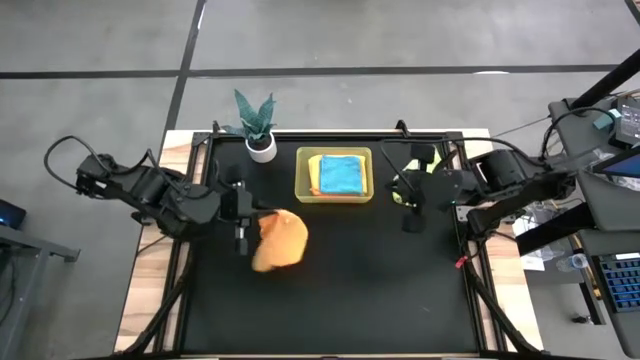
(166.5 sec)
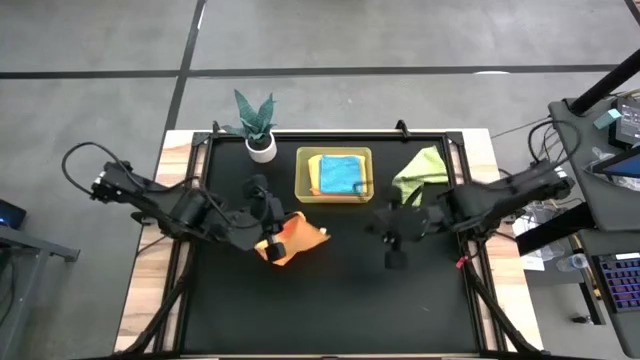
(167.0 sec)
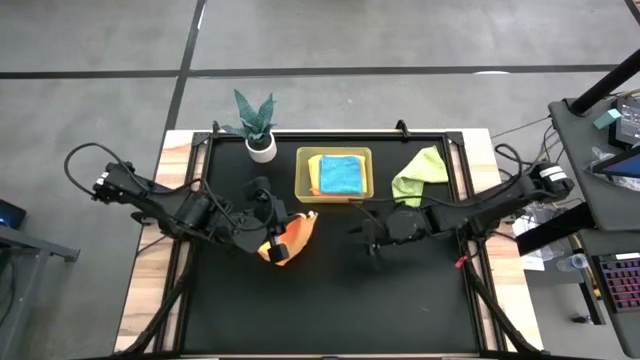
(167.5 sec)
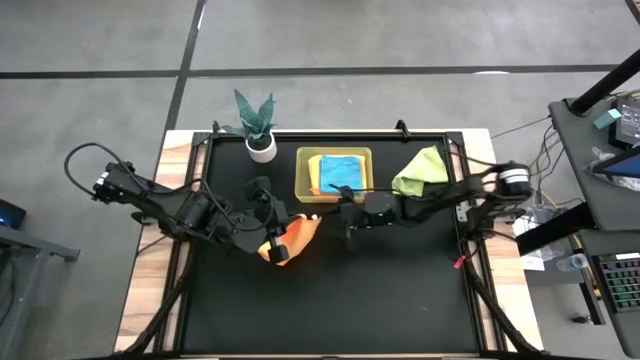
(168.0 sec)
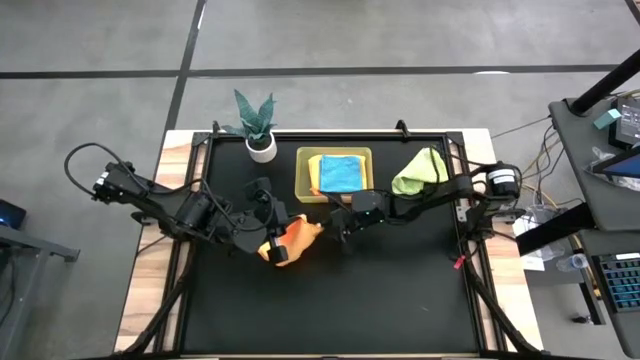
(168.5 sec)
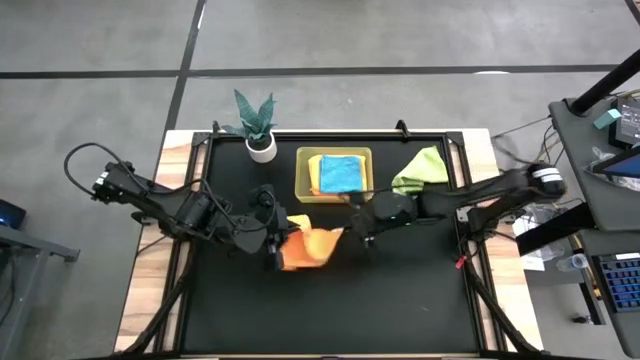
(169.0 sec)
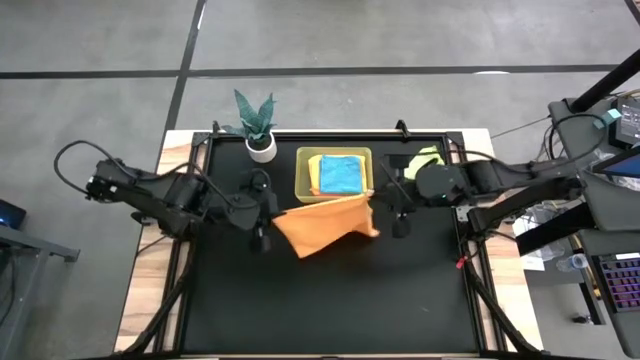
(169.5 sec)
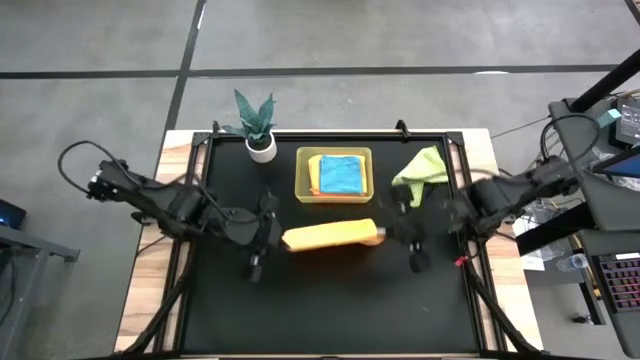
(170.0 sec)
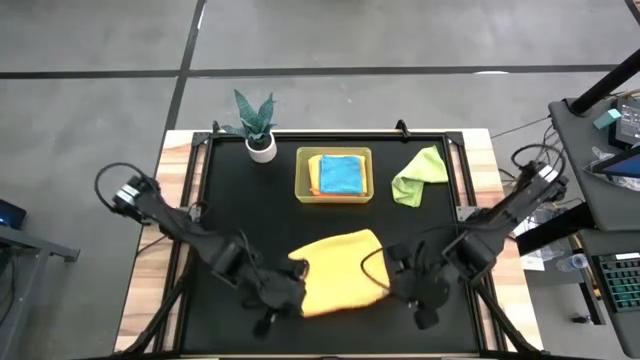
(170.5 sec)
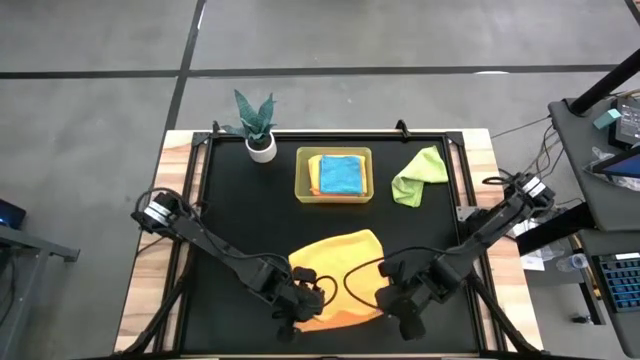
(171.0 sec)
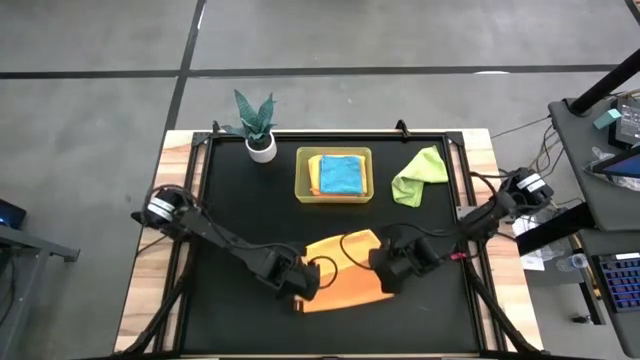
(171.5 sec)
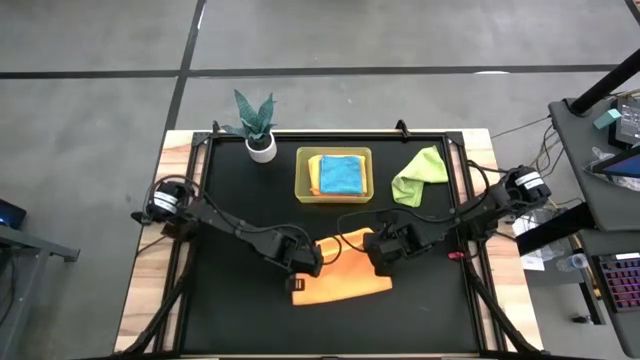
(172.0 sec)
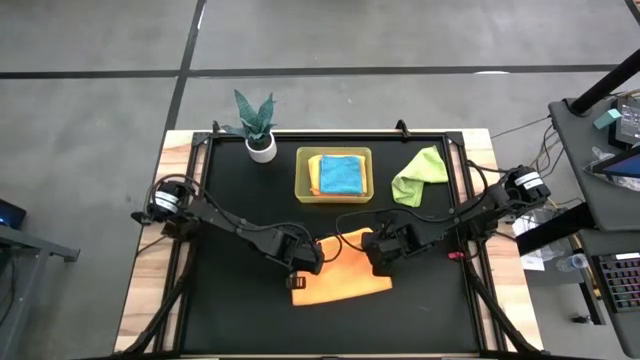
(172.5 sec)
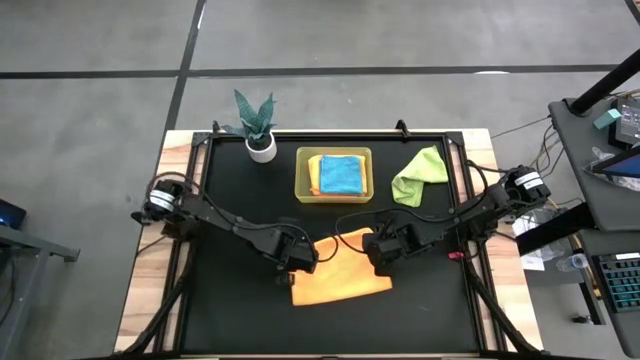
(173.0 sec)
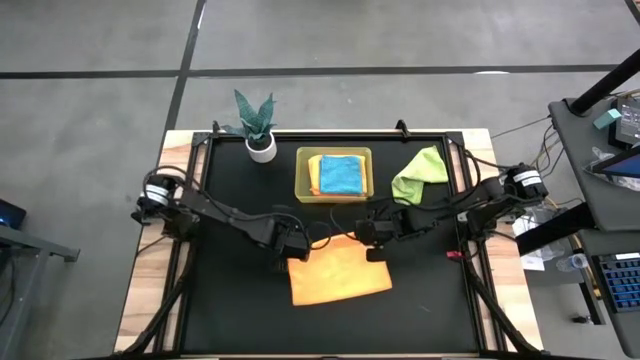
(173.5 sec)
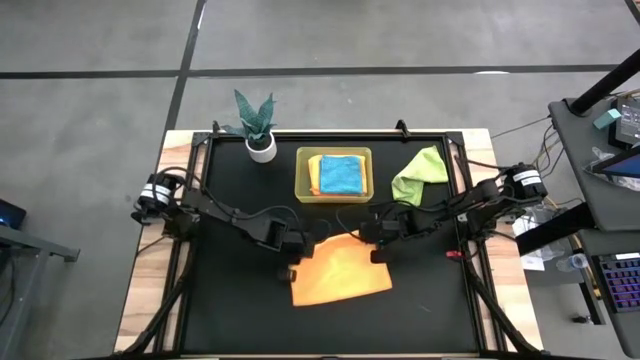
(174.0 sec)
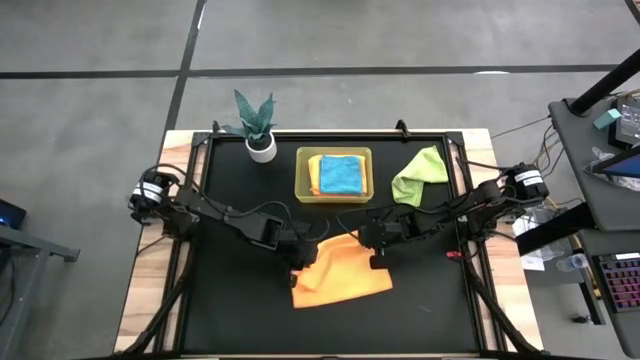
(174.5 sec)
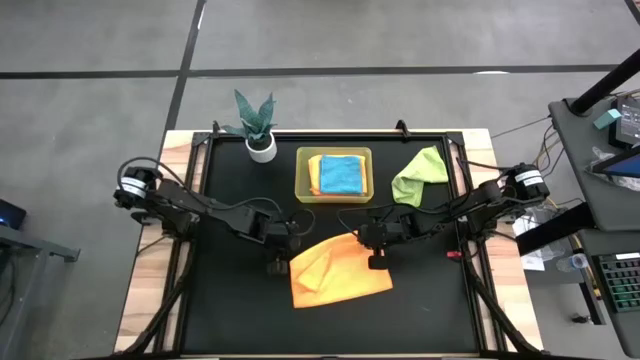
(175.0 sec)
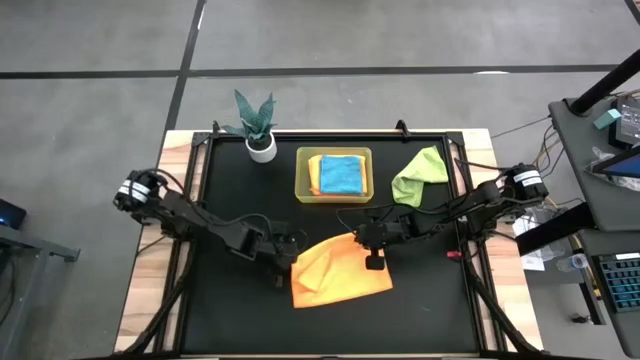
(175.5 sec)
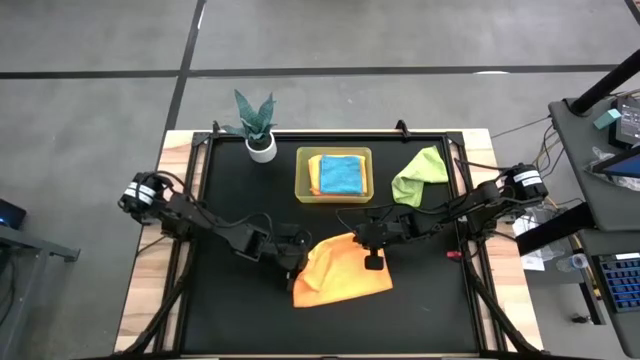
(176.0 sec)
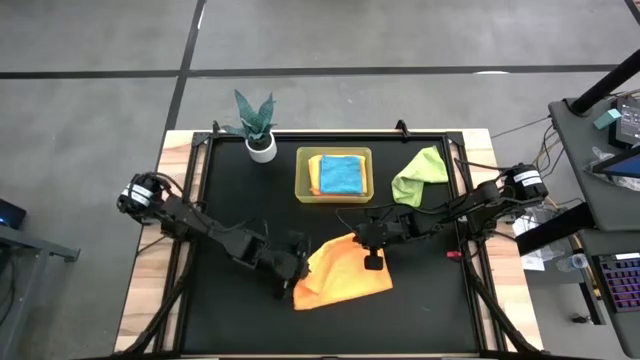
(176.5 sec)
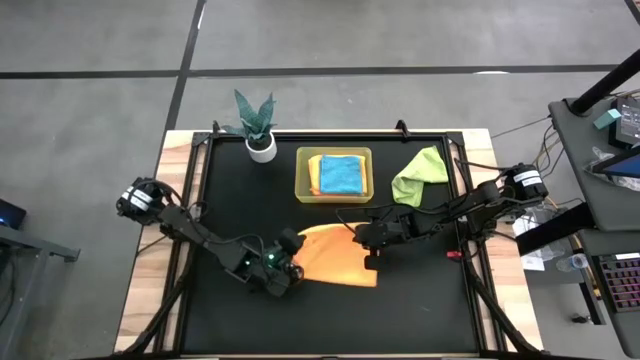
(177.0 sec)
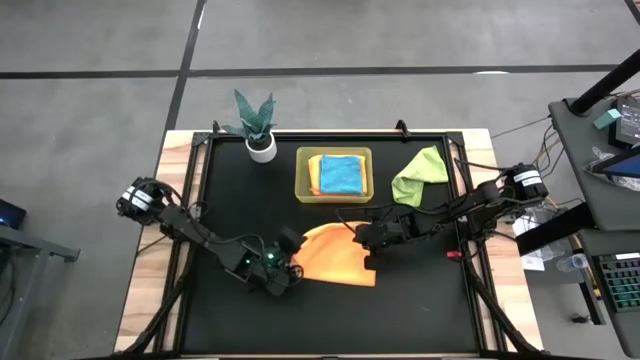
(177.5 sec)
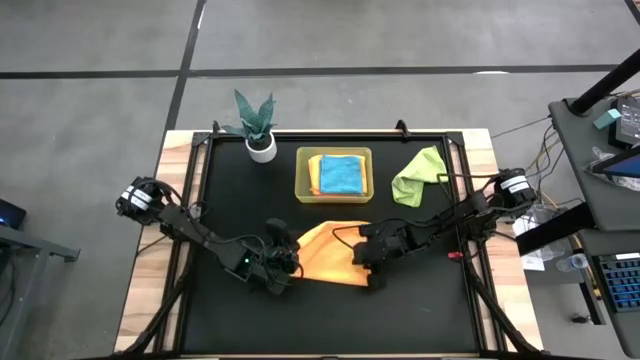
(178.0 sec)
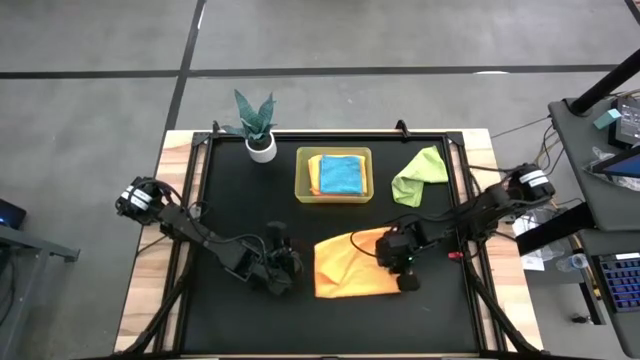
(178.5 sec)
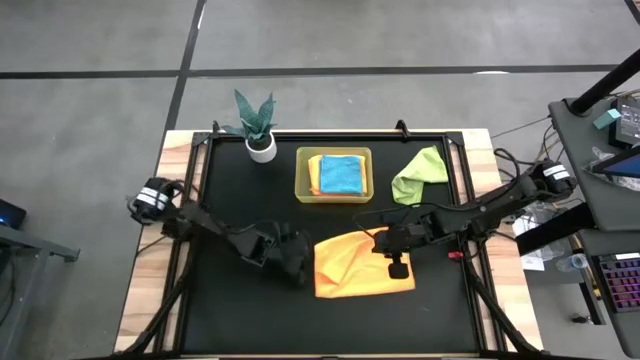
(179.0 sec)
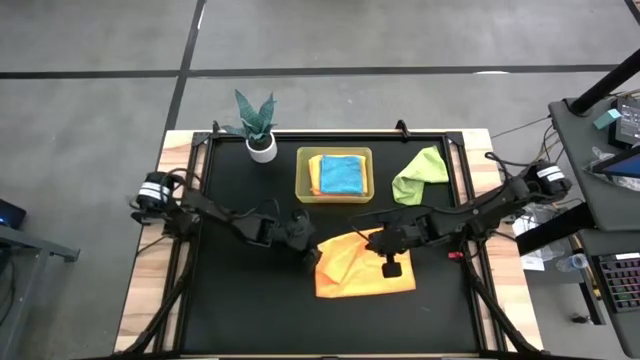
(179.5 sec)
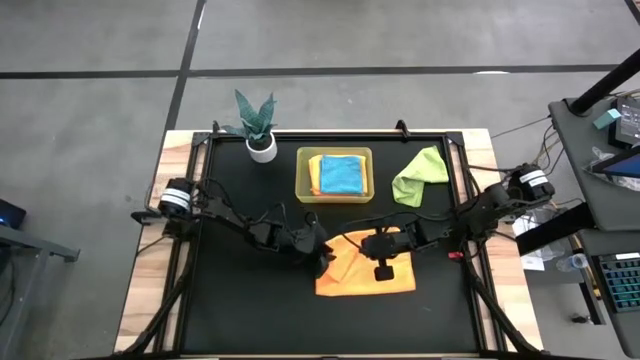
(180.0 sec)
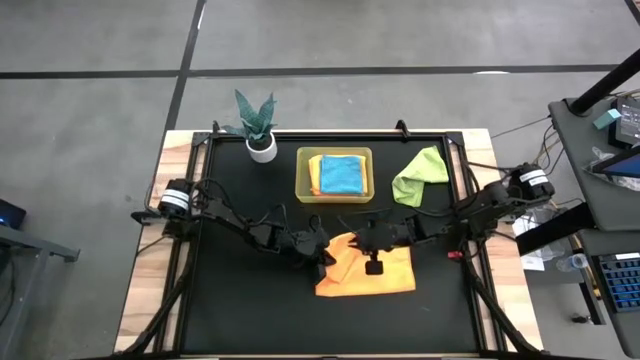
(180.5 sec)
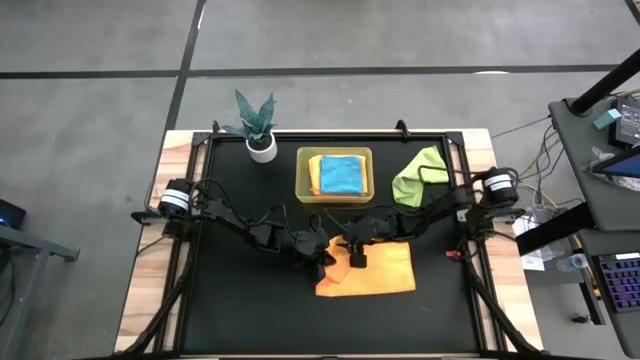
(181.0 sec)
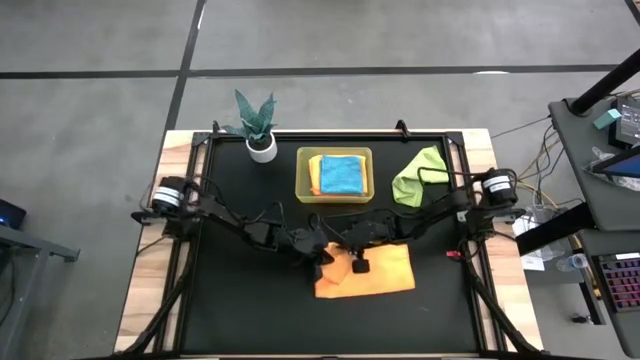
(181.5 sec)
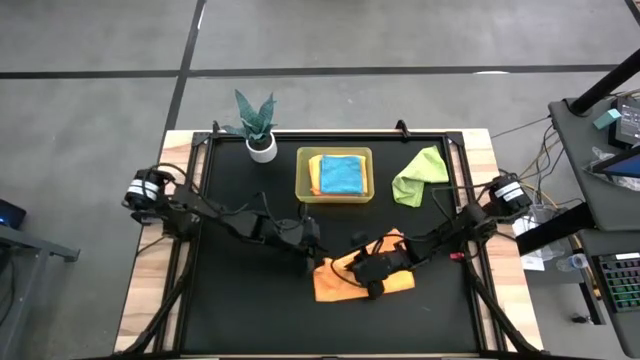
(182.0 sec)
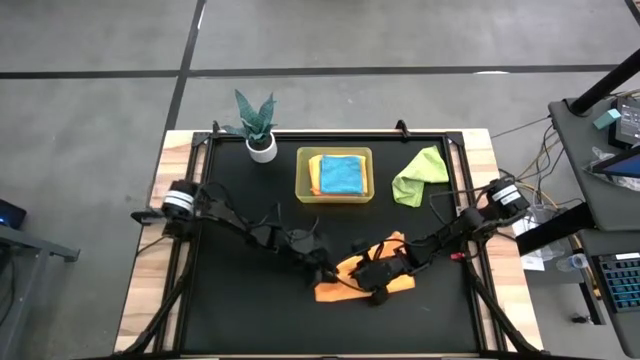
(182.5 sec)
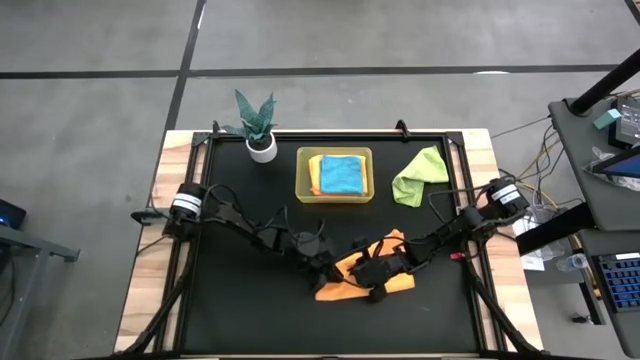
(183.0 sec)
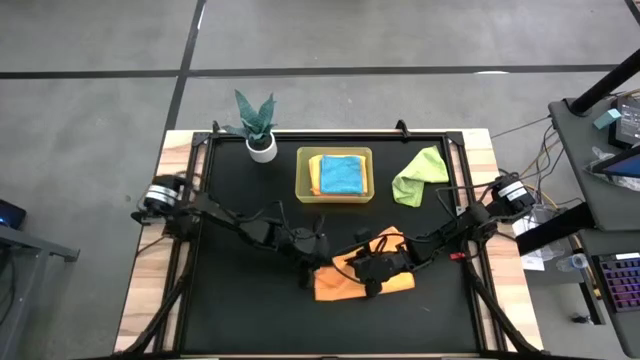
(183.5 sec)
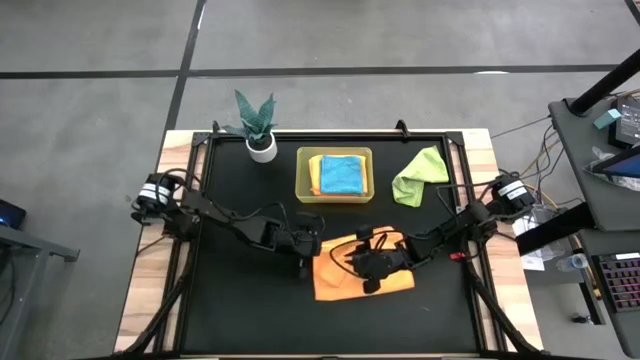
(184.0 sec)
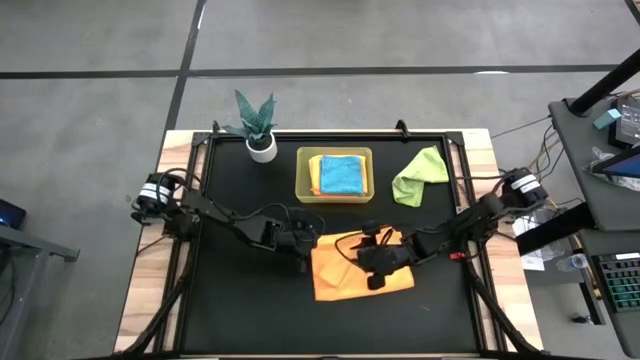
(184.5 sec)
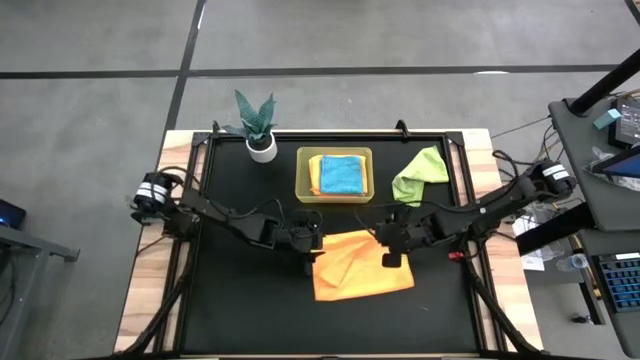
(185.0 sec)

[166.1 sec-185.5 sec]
Task: Fold microfiber towels
Fold the yellow towel on the table
